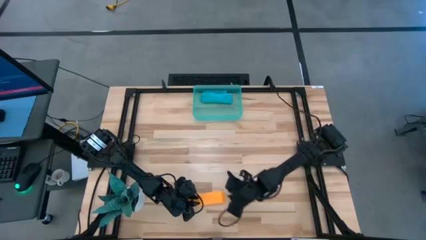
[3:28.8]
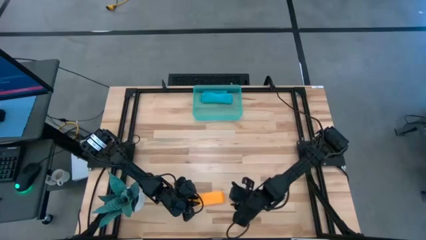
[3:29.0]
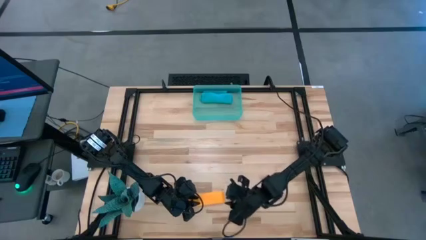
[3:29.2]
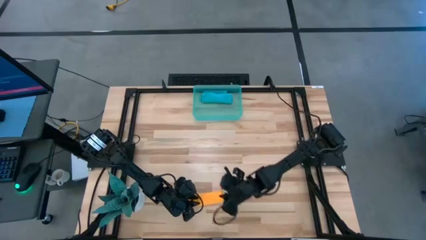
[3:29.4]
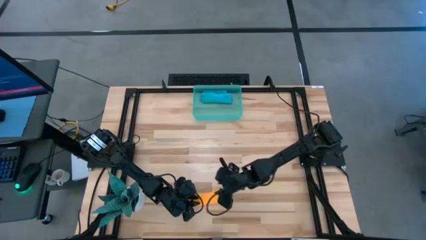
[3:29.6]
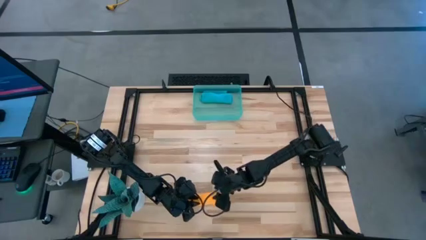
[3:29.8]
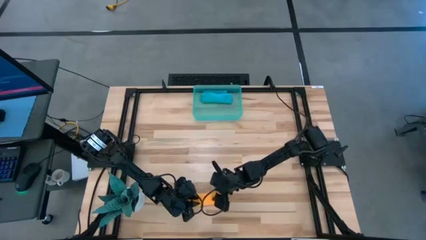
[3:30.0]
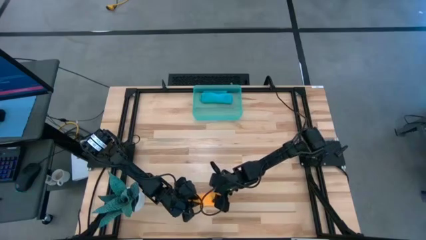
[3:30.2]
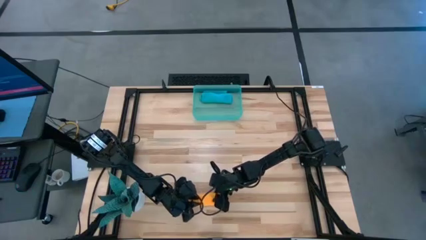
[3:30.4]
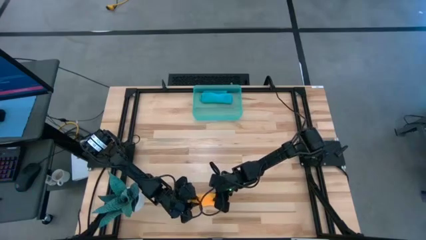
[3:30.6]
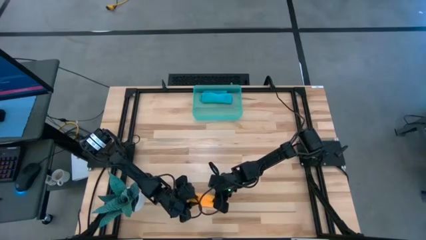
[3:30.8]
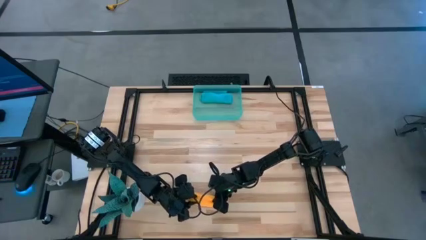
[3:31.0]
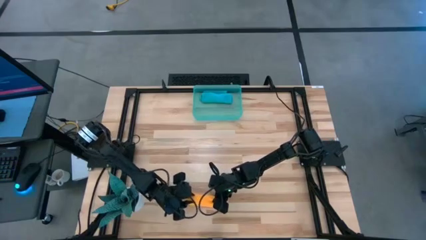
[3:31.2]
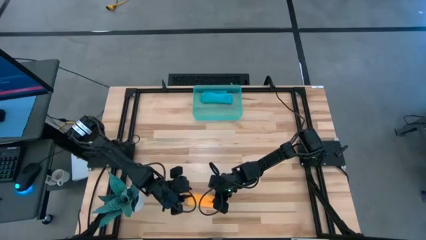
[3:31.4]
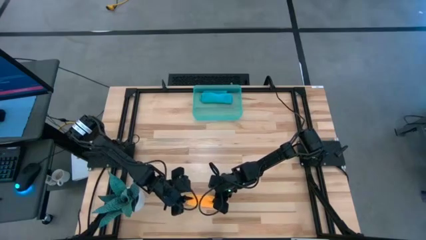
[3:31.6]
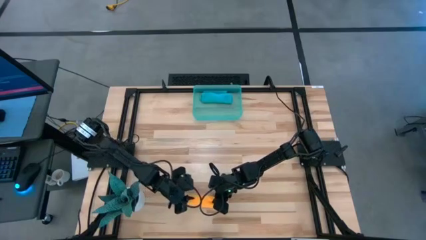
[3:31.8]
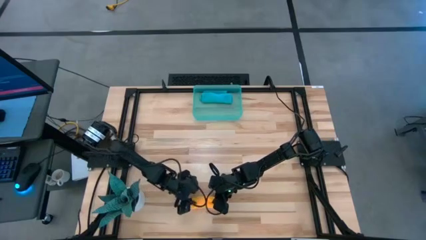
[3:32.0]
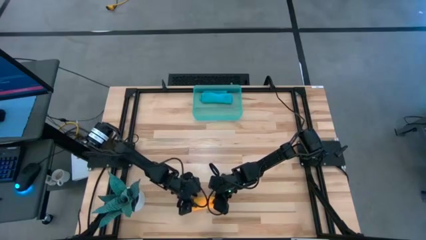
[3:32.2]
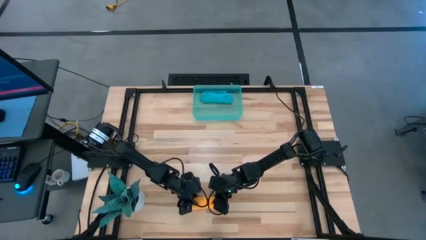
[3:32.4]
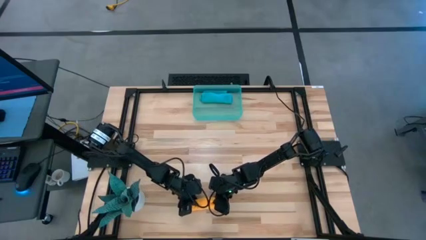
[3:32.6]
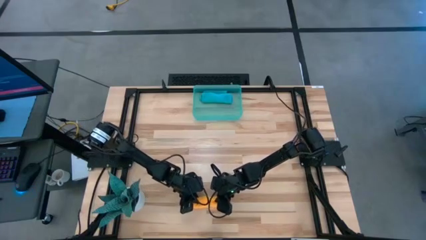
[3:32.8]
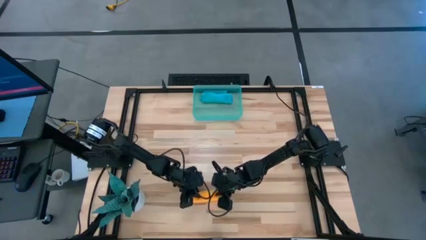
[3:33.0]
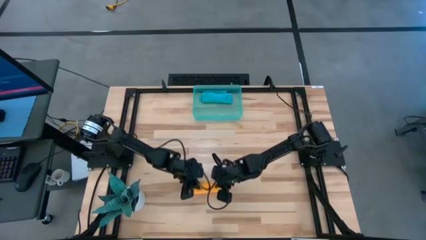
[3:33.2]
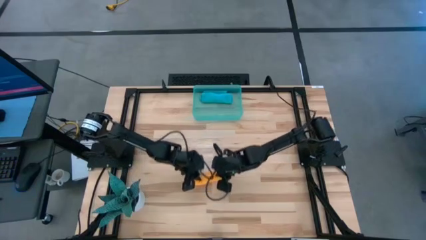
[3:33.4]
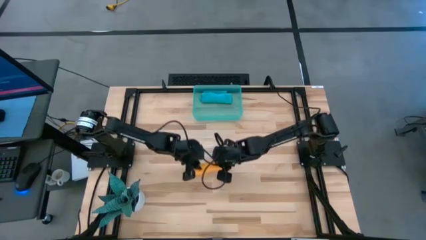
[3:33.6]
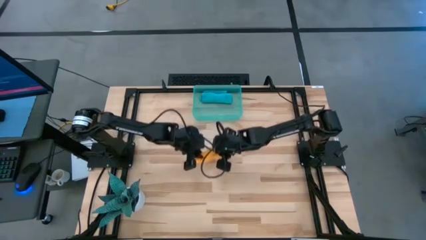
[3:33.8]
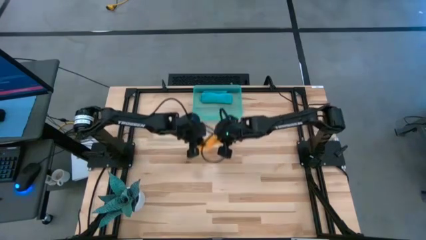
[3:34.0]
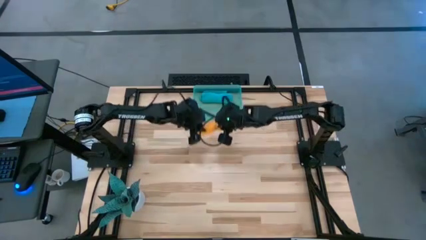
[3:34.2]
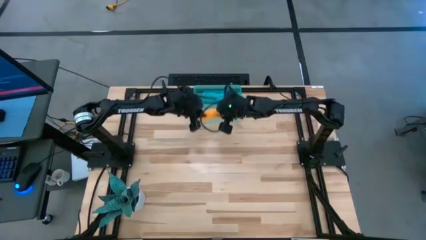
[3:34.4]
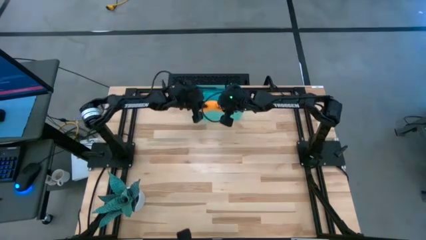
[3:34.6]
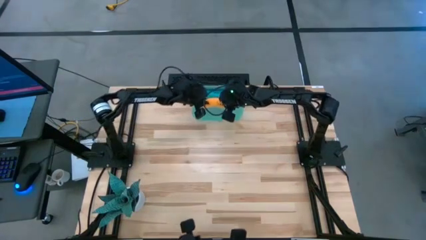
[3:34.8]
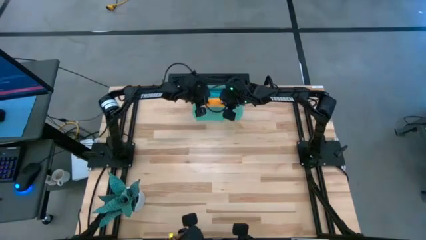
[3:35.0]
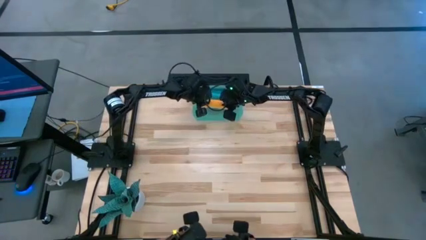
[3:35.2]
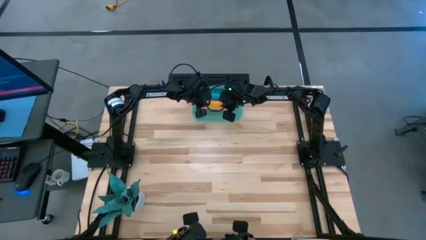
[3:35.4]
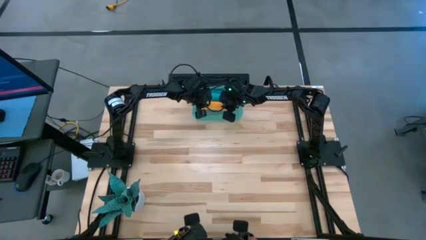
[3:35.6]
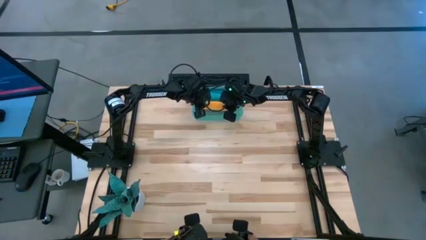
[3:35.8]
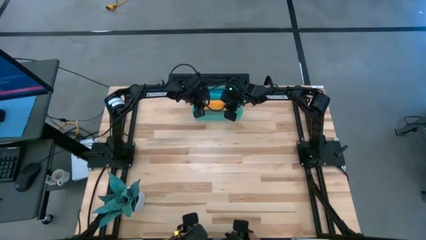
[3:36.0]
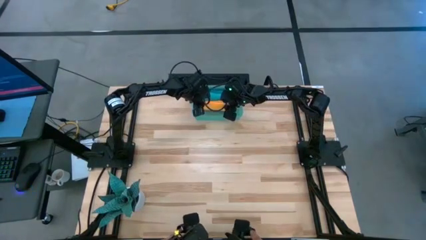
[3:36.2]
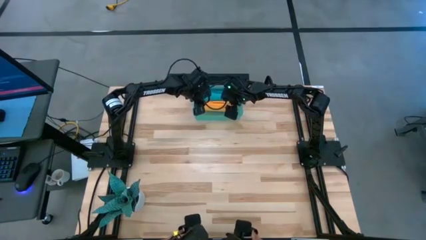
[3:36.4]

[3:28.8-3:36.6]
Task: Roll microfiber towels into tight, uniform cylinder then place into a basket
Put the rolled orange microfiber cloth into the blue bin

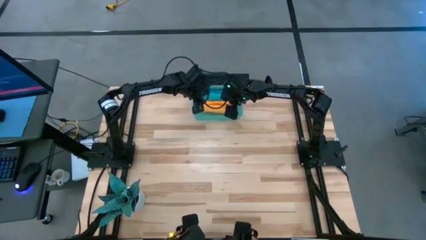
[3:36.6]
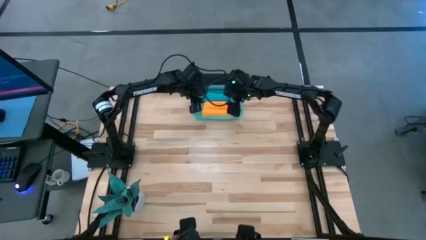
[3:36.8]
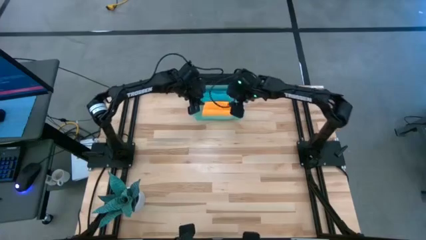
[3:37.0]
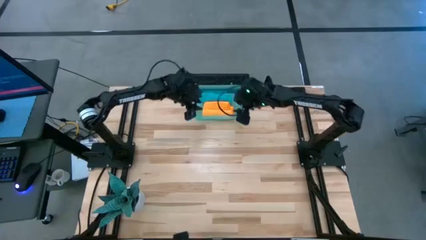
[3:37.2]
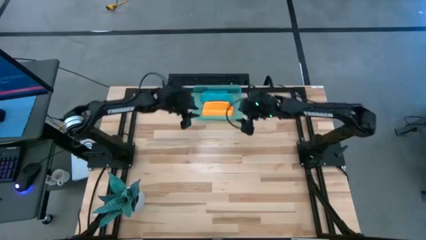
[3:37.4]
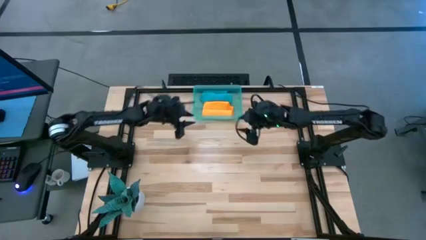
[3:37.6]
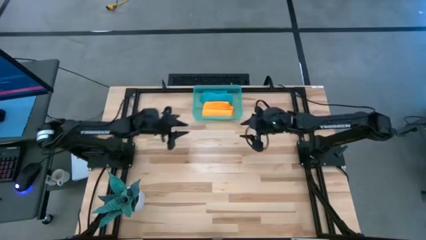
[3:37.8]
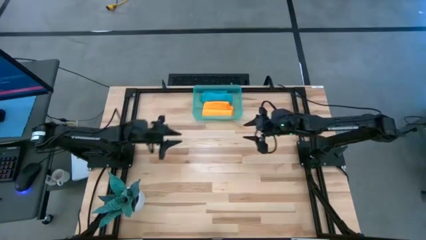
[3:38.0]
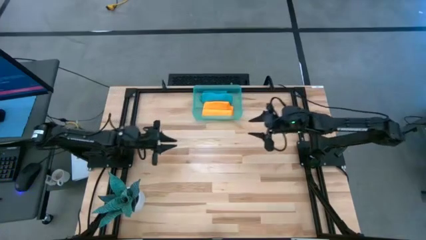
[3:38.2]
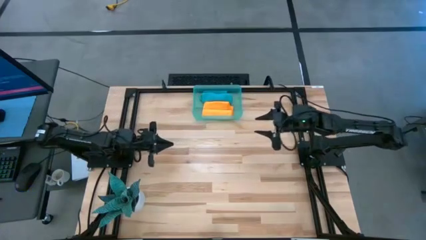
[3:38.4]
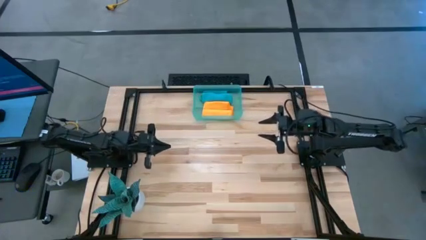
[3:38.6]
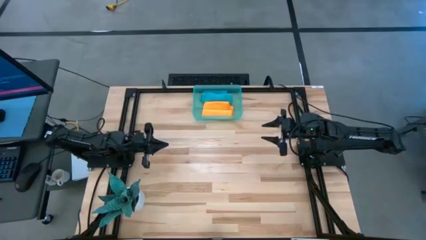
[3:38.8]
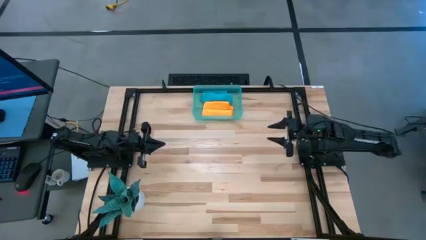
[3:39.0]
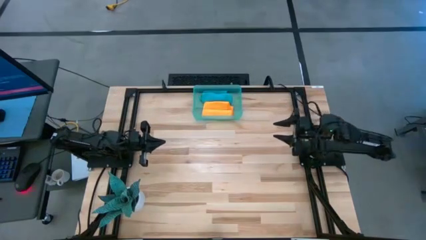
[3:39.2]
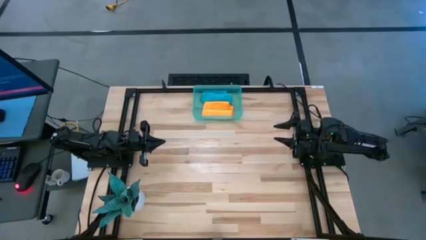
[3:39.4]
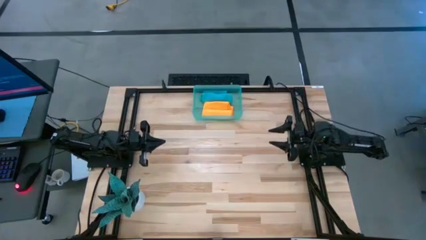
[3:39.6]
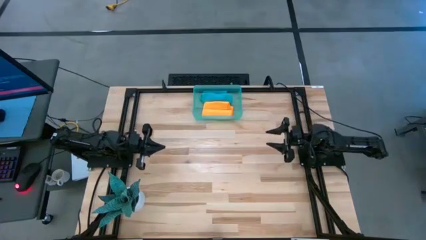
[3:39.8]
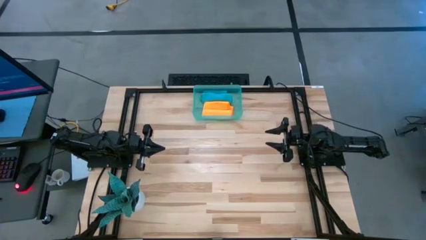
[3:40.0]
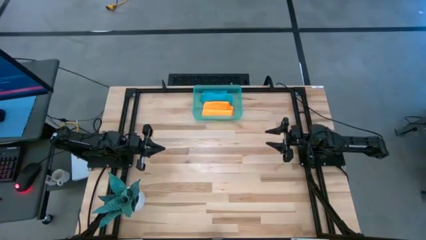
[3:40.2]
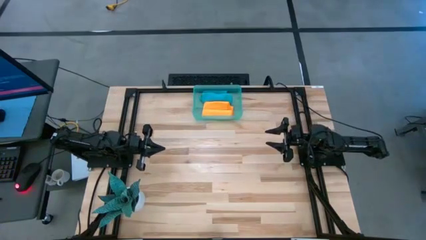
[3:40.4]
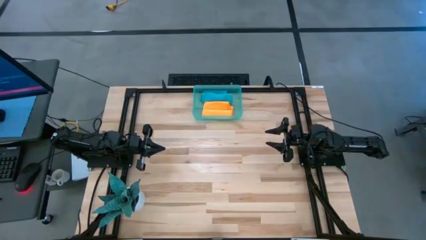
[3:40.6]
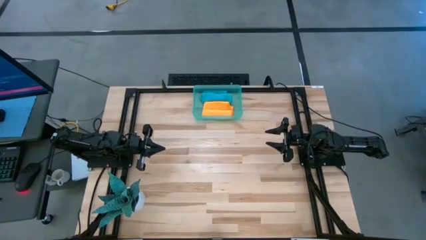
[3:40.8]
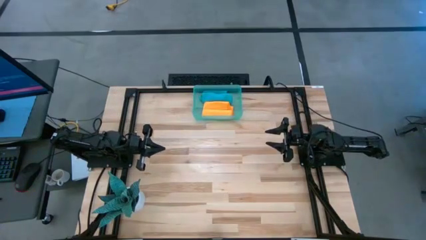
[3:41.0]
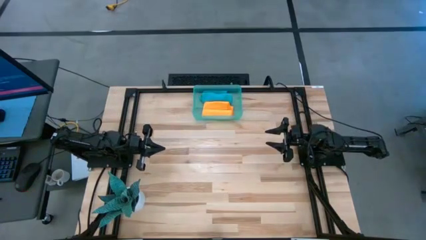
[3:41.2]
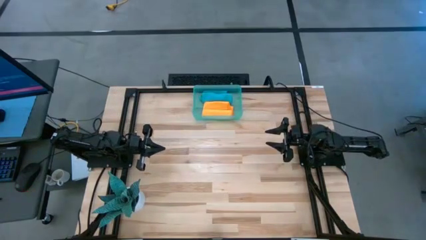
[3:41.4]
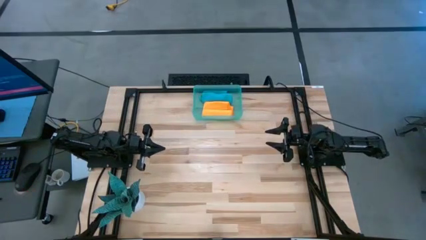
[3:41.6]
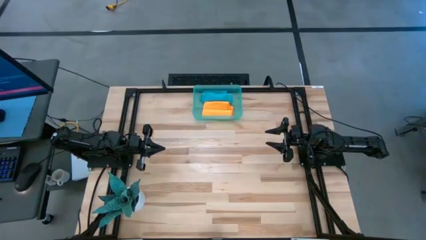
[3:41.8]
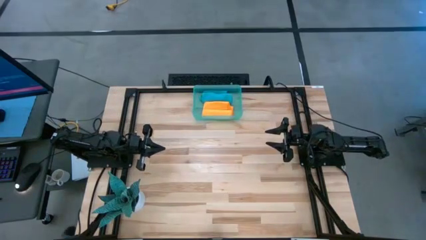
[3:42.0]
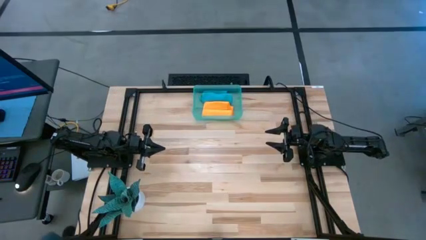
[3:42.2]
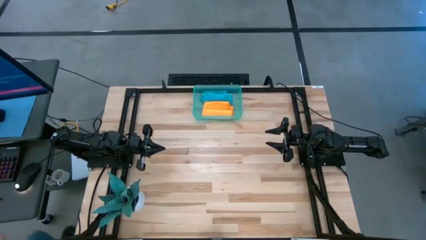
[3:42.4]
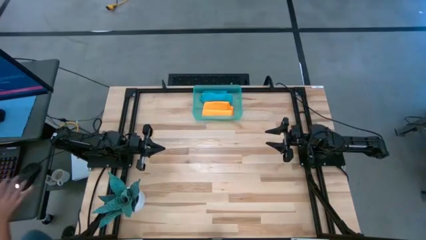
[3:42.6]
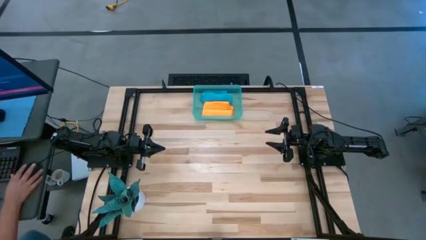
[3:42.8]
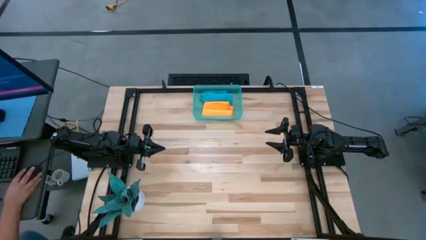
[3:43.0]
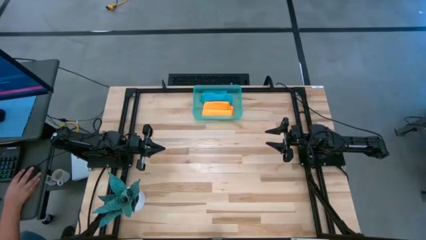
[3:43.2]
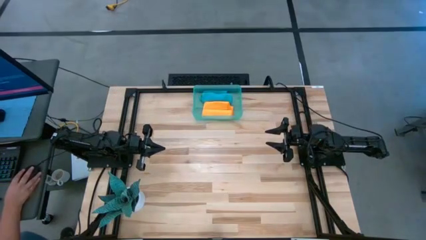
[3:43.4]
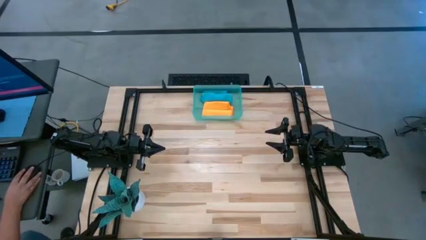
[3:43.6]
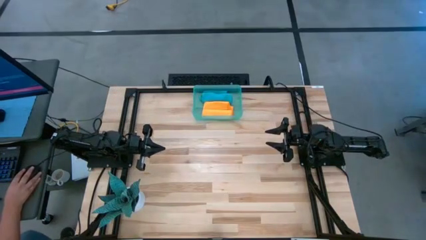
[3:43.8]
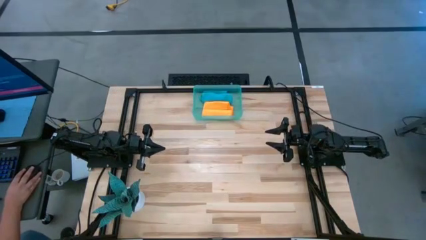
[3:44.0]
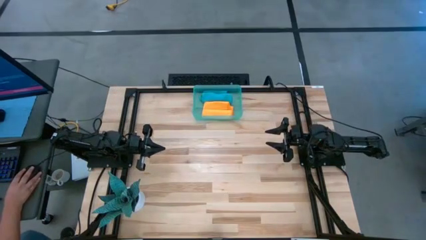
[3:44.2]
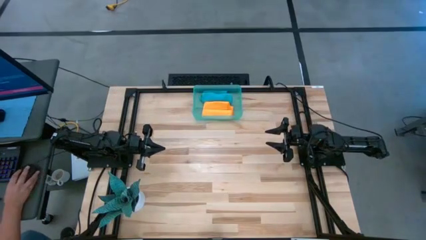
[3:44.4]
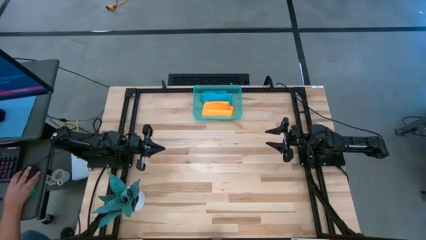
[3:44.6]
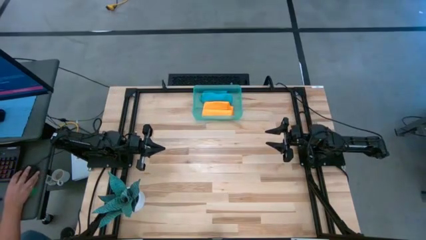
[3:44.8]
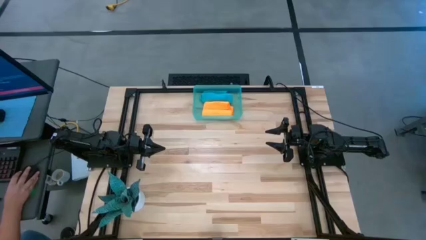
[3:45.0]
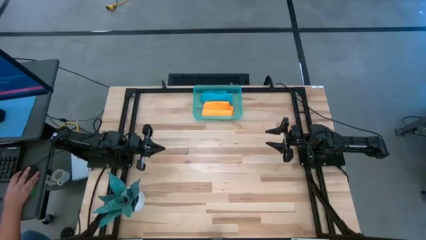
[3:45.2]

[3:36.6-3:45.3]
Return to Home Position
